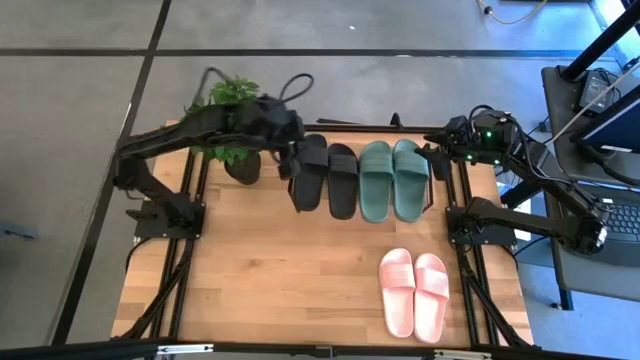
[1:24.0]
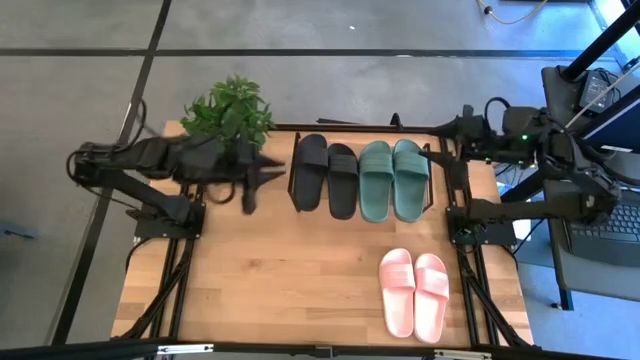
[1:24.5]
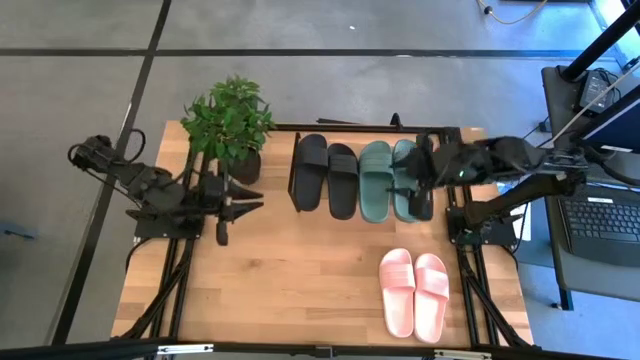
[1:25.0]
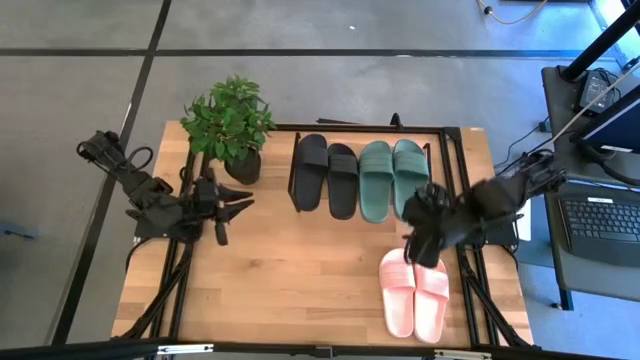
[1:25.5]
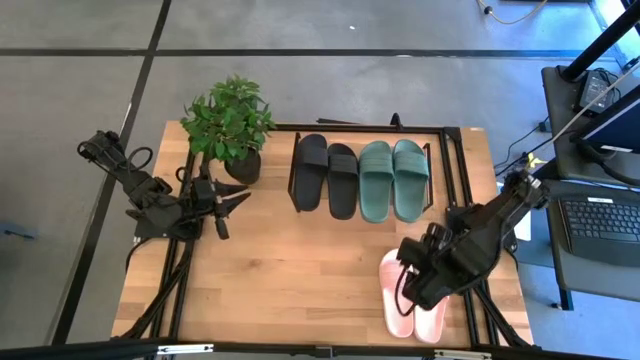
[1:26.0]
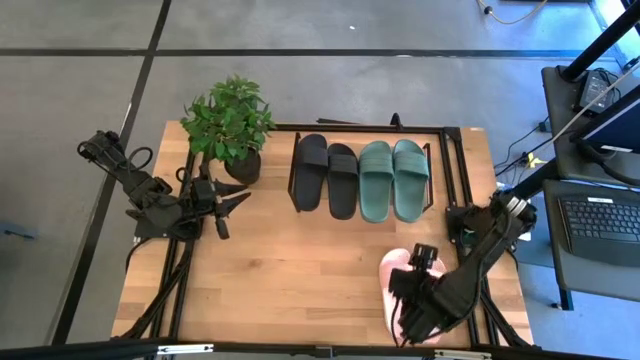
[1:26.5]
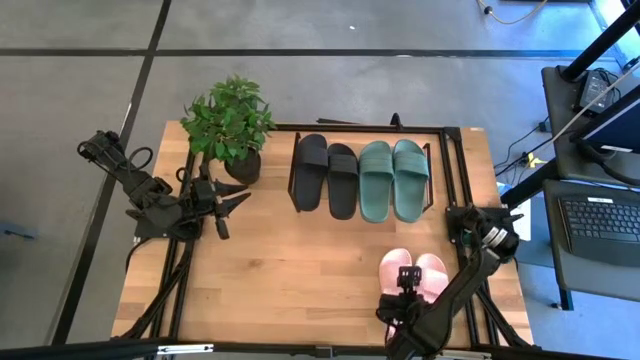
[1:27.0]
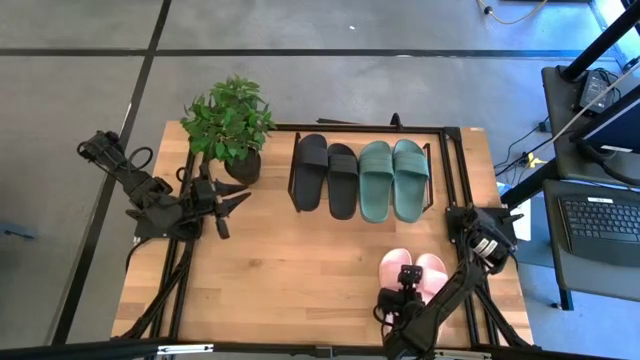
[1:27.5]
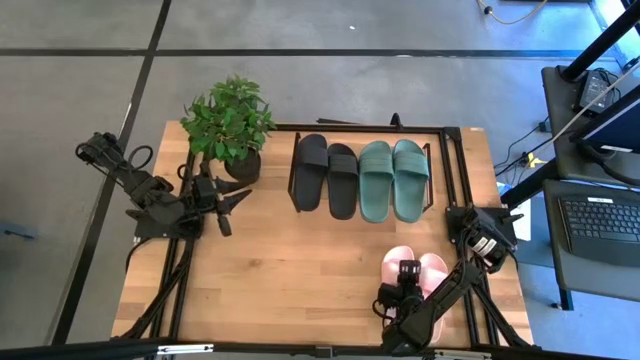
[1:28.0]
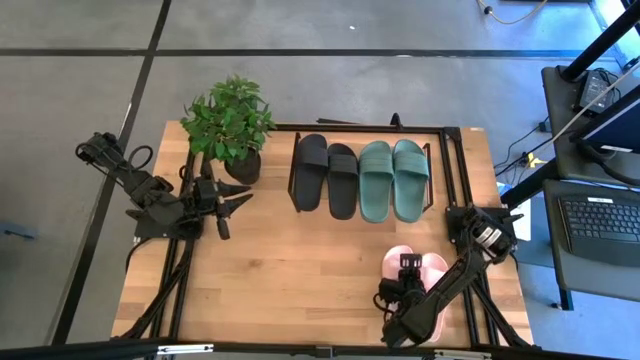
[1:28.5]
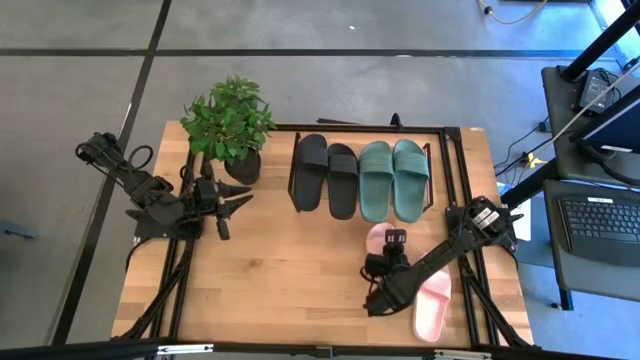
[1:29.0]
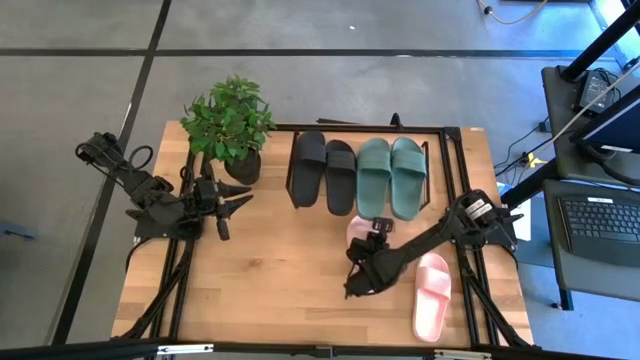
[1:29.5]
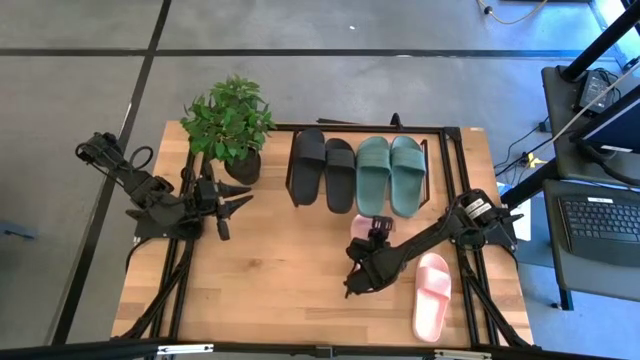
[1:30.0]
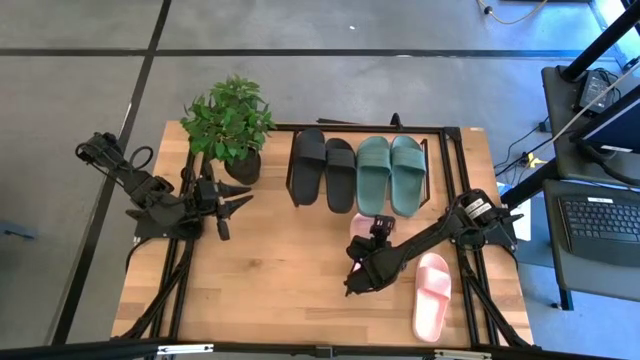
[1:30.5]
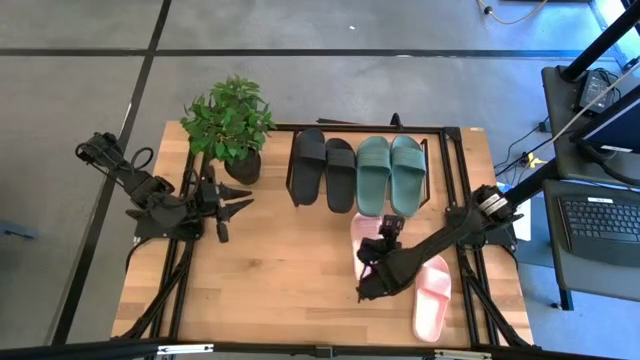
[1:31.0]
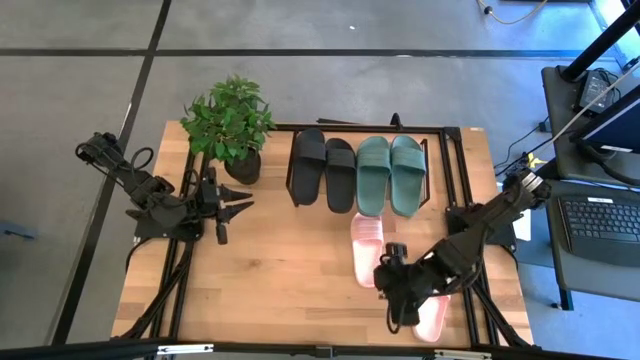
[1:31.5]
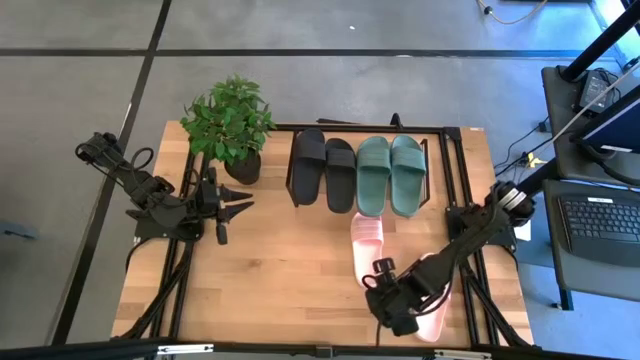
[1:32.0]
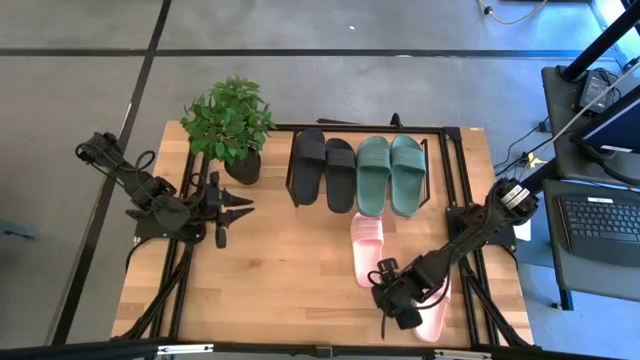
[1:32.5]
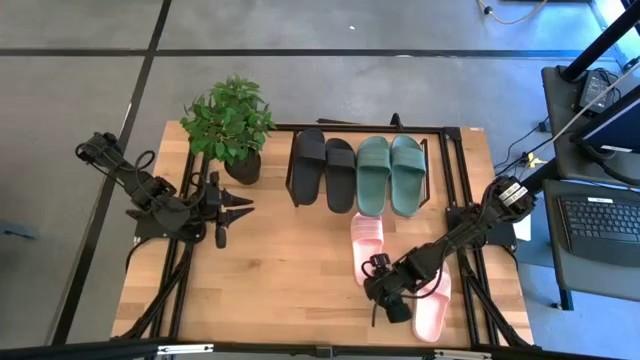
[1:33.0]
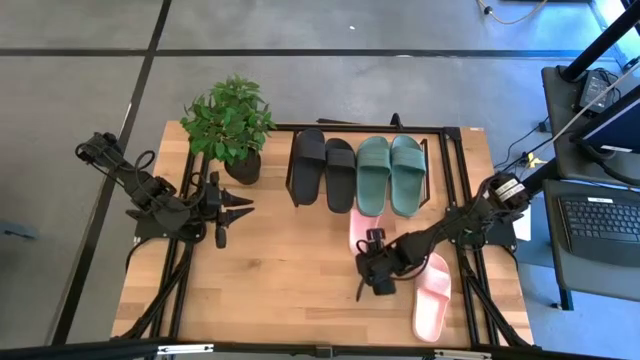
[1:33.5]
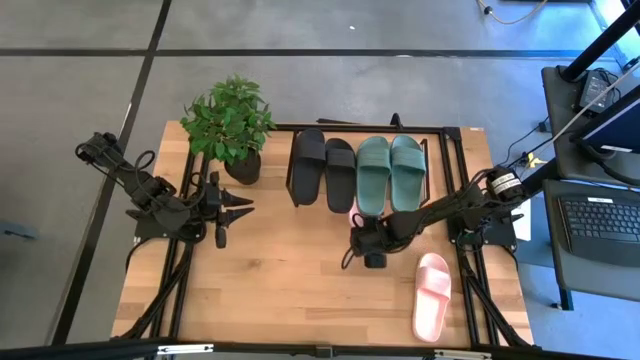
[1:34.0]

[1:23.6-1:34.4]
Task: Pick and place slides into the shelf
Put the left pink slides under the shelf

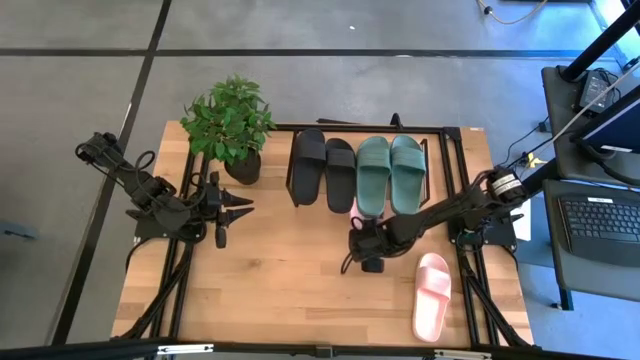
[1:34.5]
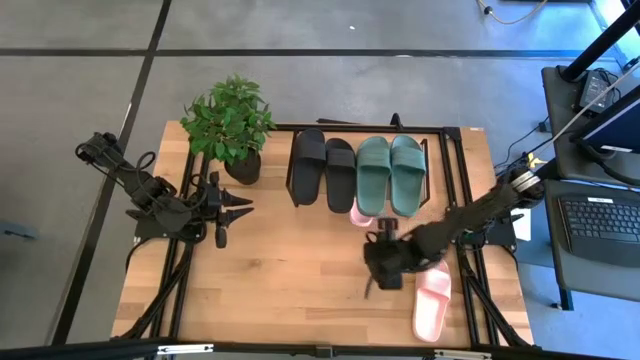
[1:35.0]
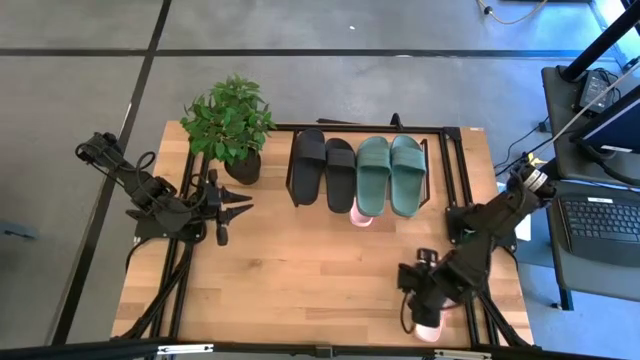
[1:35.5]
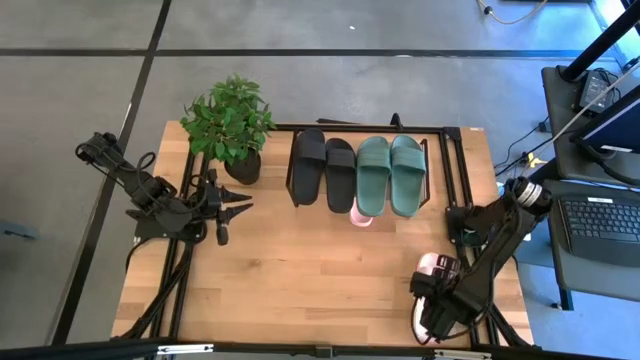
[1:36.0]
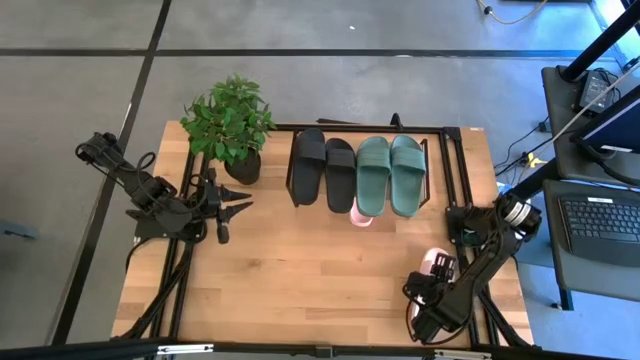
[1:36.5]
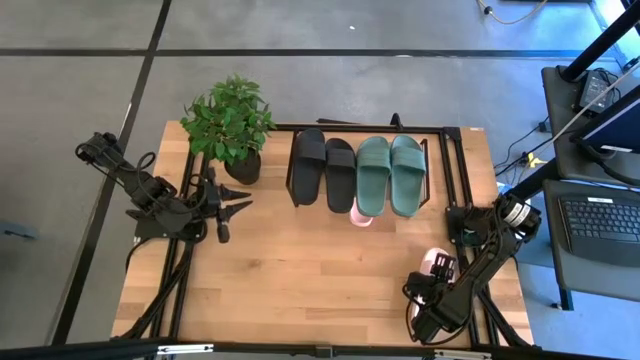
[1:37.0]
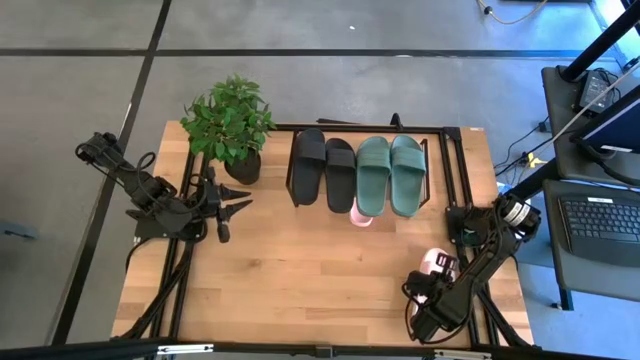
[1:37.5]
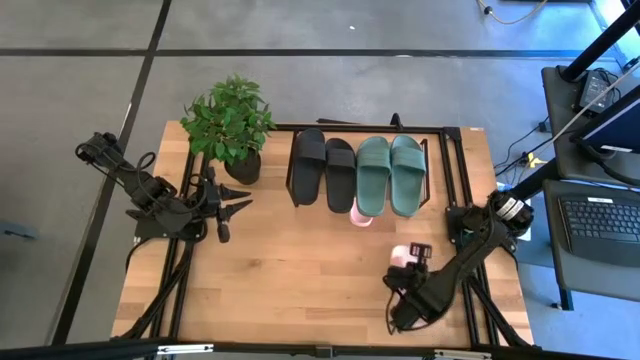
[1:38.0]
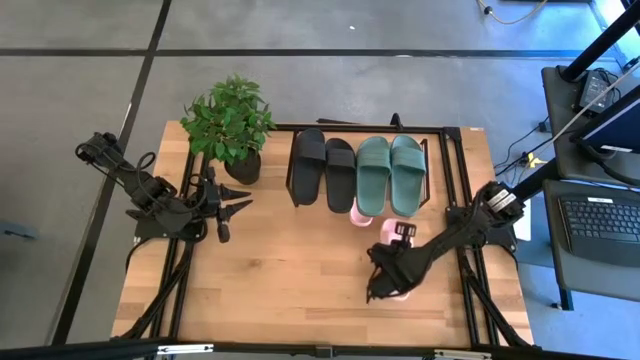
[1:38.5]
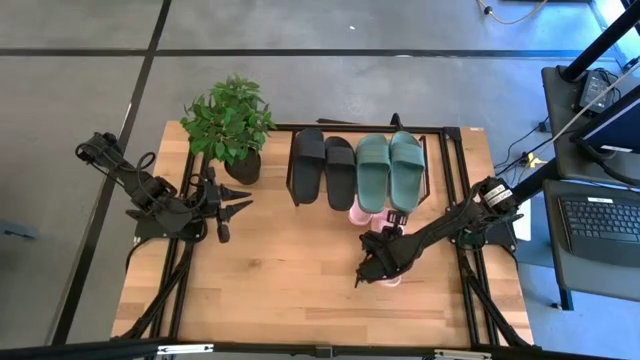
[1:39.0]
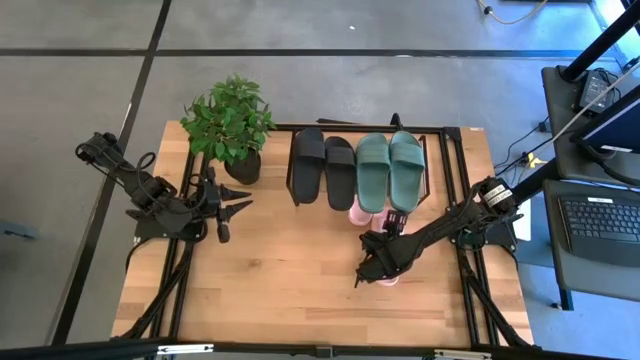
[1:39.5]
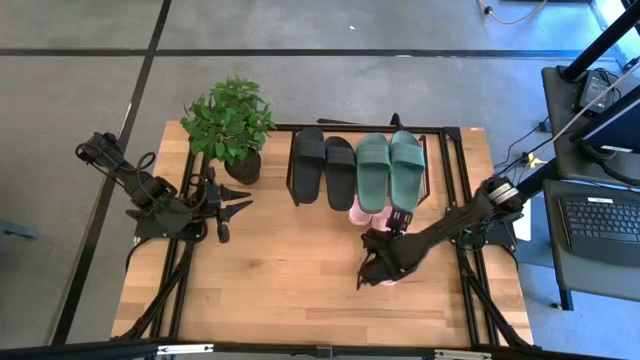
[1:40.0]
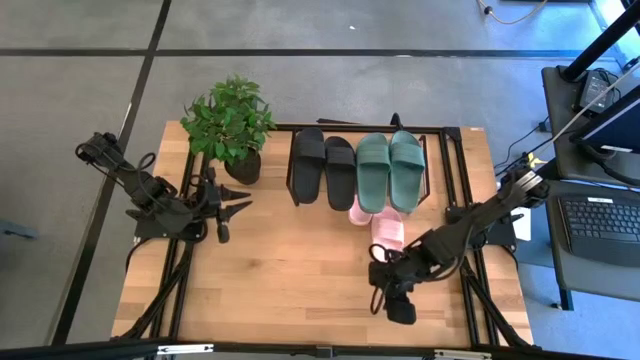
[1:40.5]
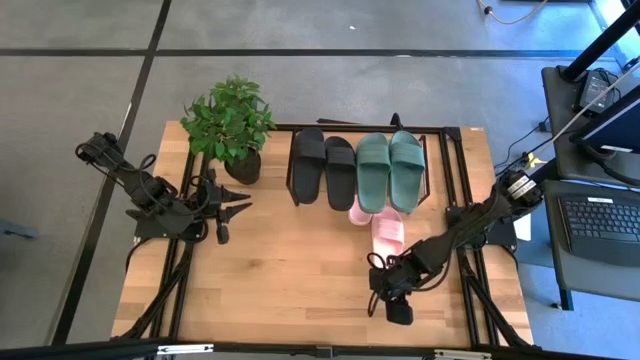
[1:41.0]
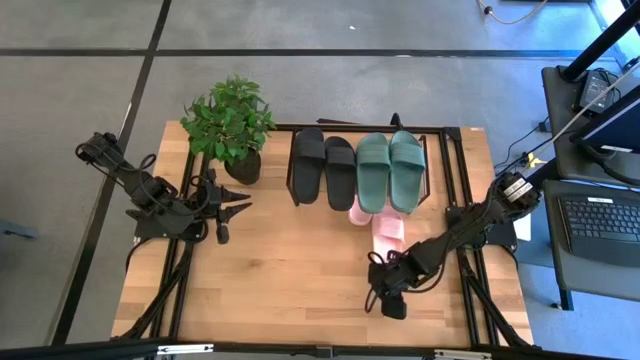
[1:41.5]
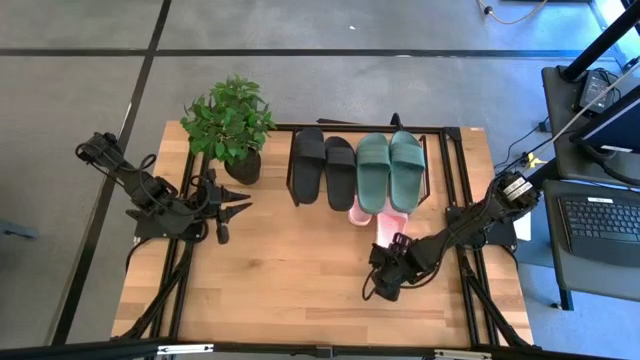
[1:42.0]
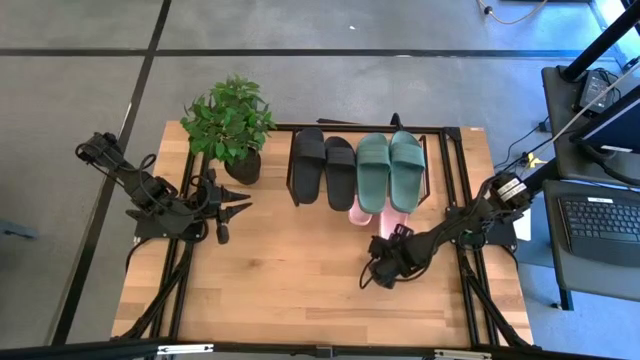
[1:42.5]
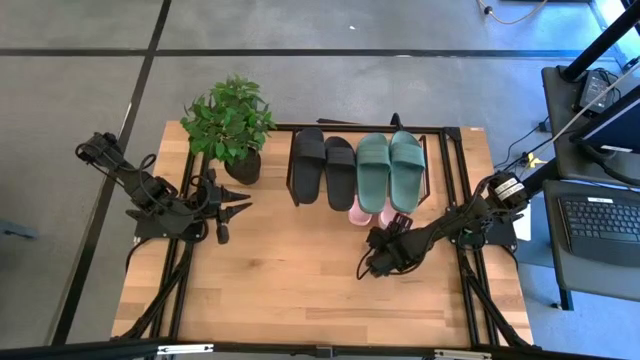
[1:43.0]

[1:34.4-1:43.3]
Put the pink slides under the shelf

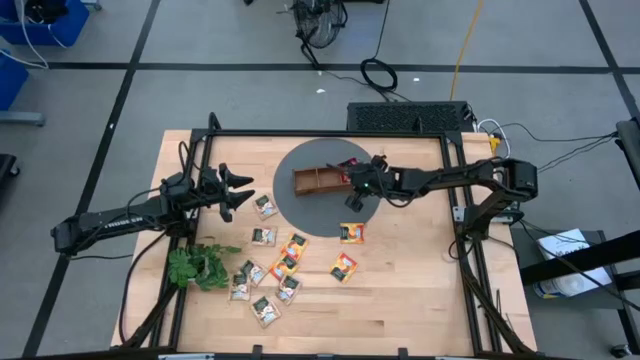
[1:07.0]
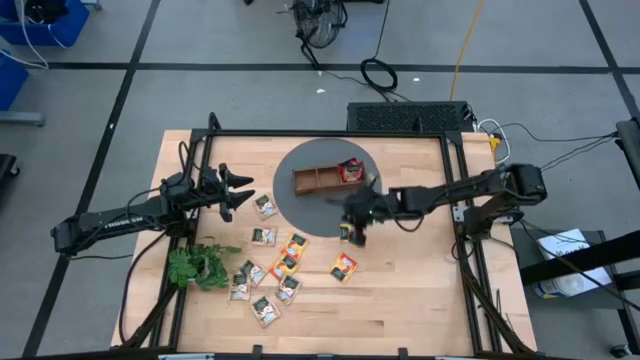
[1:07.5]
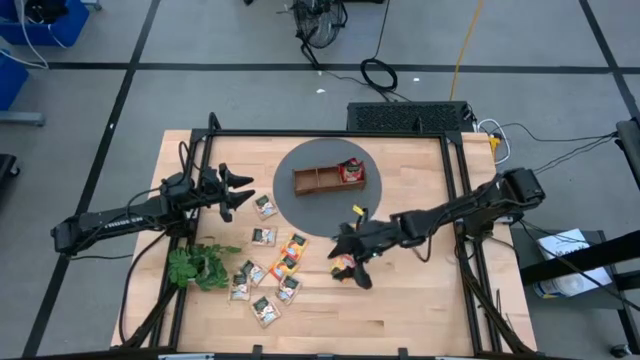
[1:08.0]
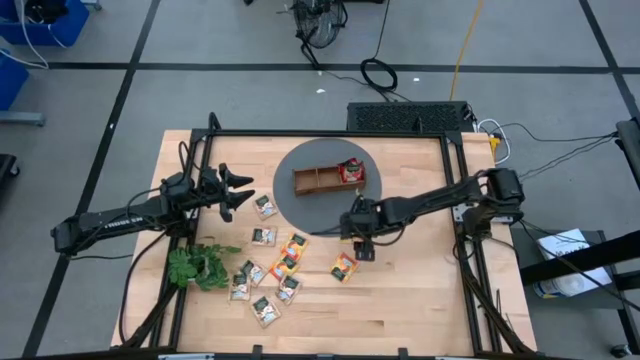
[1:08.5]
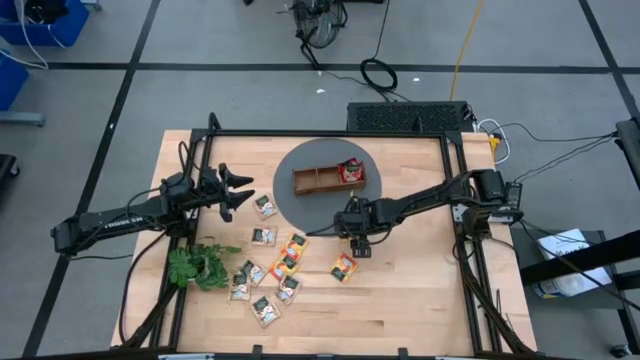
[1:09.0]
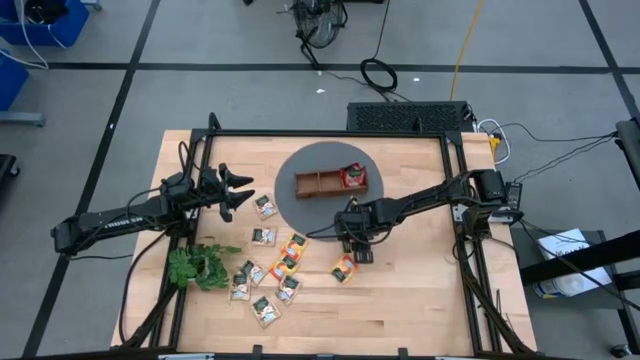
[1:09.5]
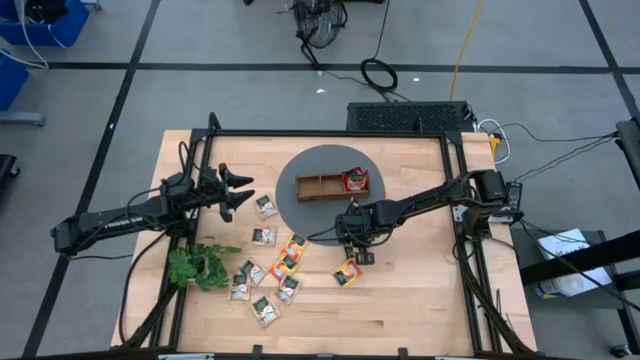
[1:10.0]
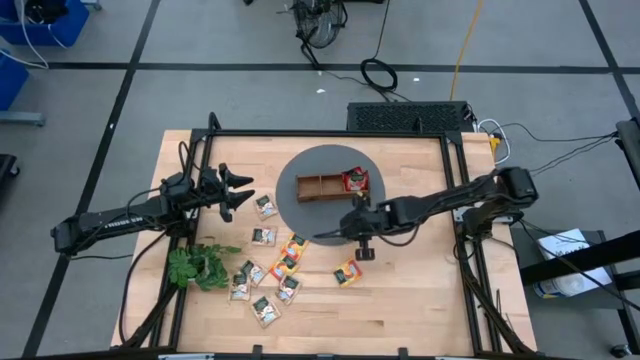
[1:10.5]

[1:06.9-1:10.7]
Task: Pick & Place Tea
Put the yellow tea bag into the middle section of the wooden organizer
